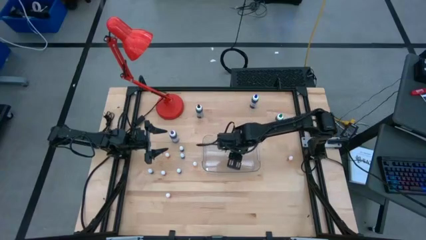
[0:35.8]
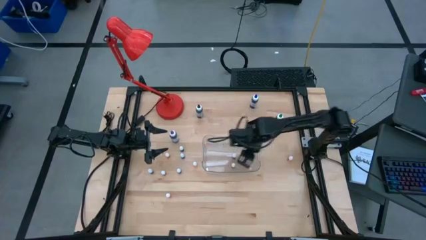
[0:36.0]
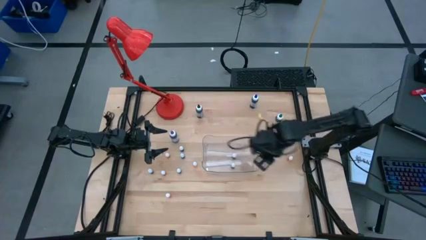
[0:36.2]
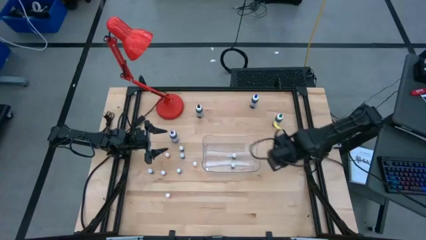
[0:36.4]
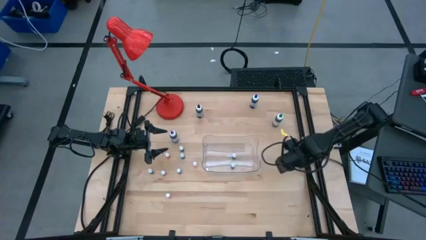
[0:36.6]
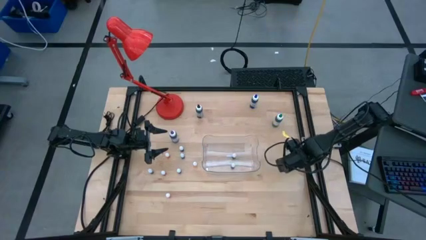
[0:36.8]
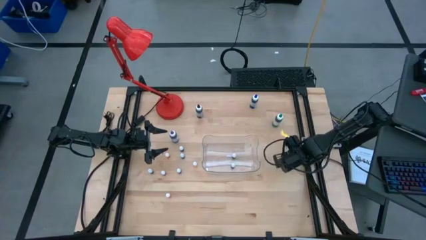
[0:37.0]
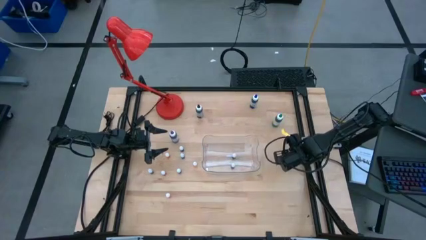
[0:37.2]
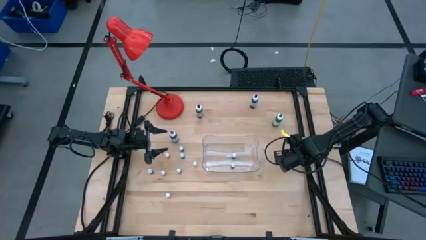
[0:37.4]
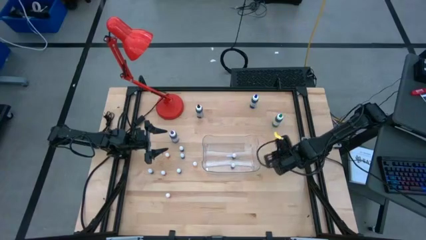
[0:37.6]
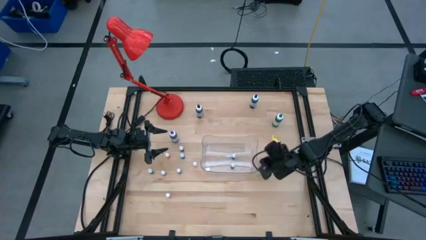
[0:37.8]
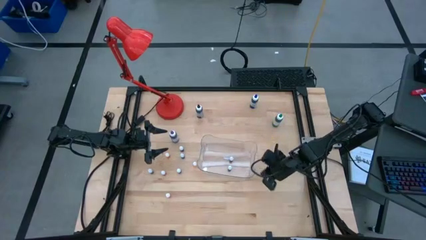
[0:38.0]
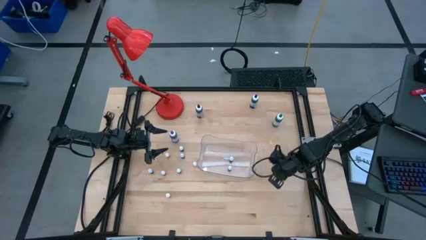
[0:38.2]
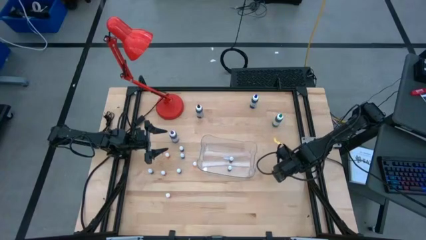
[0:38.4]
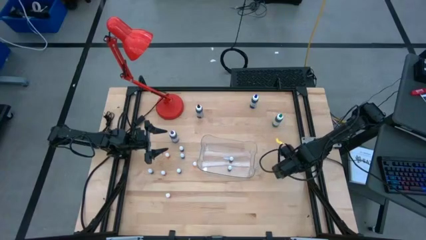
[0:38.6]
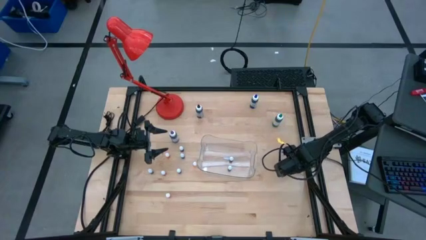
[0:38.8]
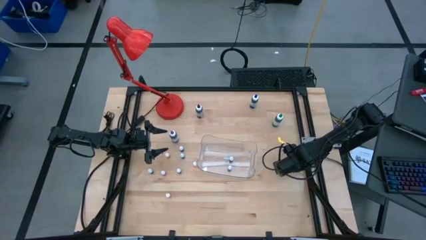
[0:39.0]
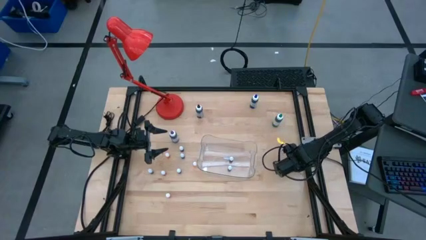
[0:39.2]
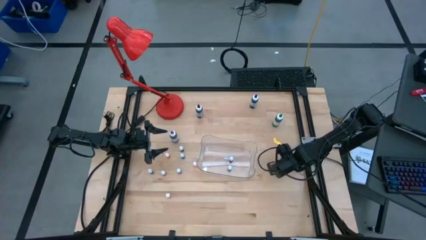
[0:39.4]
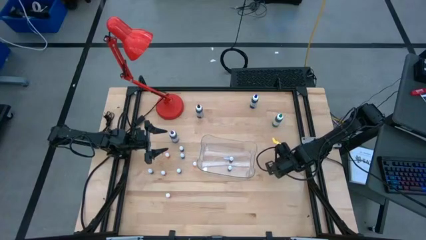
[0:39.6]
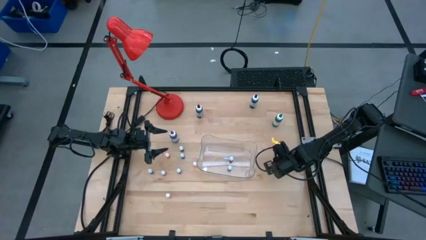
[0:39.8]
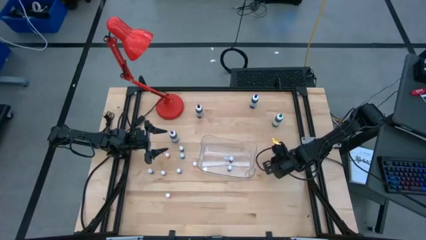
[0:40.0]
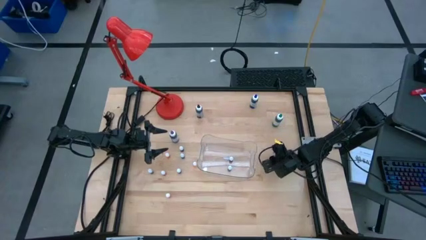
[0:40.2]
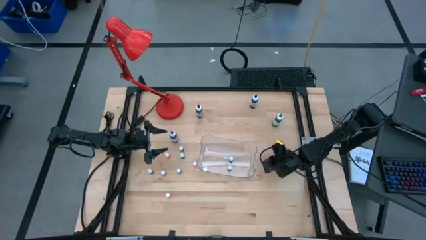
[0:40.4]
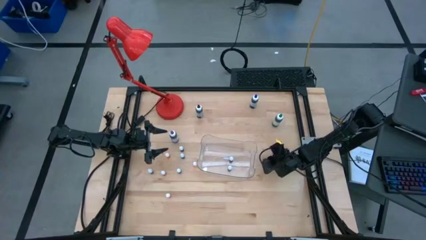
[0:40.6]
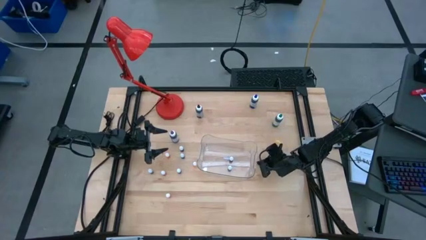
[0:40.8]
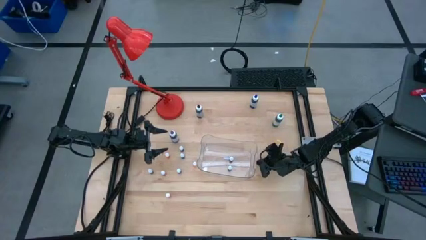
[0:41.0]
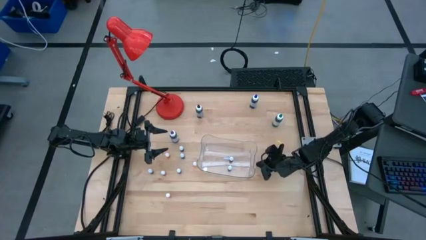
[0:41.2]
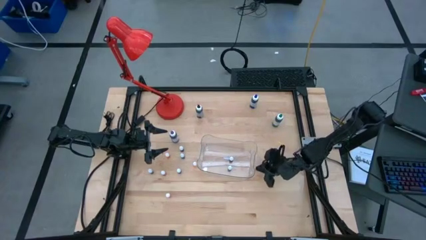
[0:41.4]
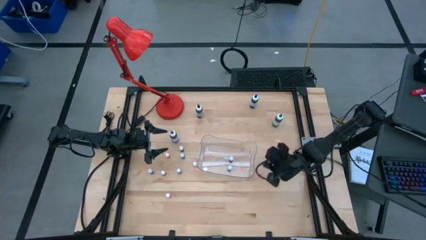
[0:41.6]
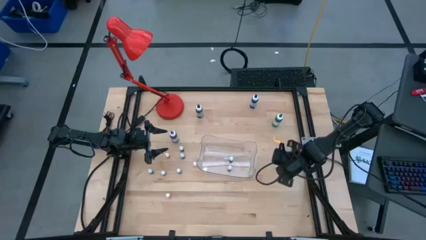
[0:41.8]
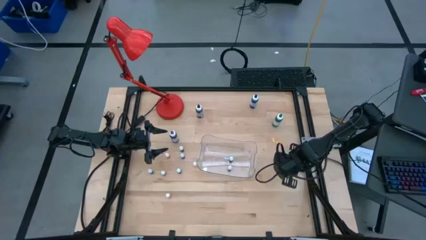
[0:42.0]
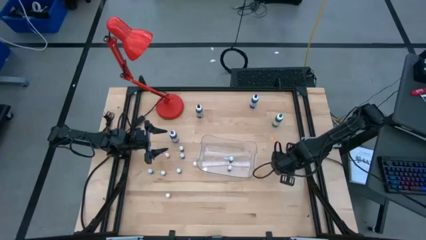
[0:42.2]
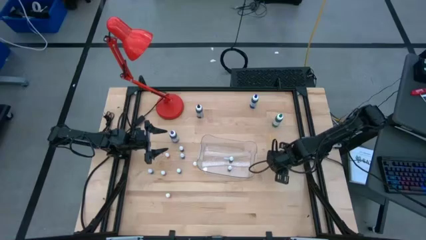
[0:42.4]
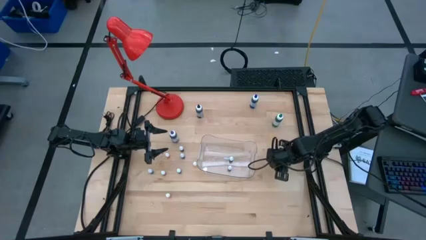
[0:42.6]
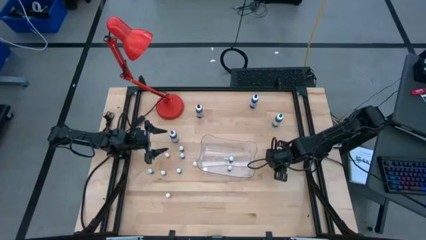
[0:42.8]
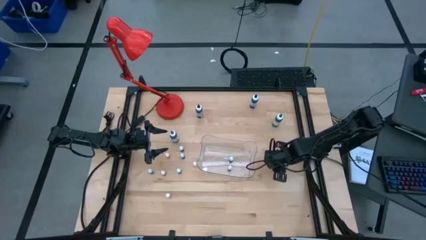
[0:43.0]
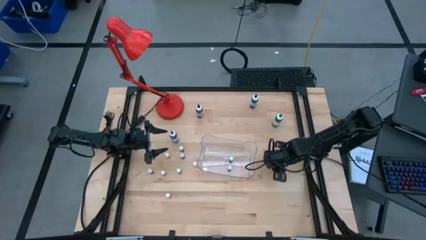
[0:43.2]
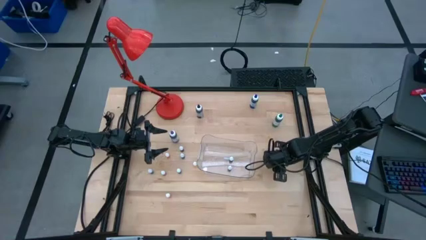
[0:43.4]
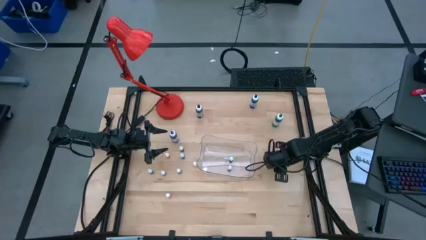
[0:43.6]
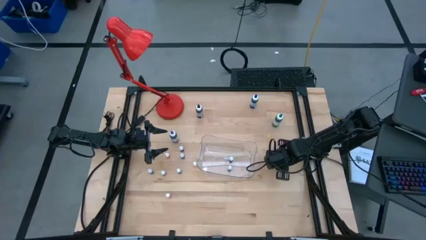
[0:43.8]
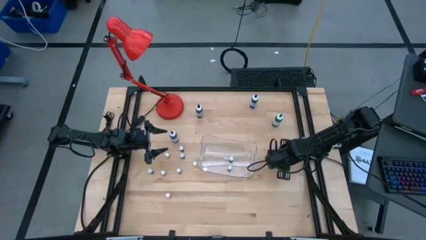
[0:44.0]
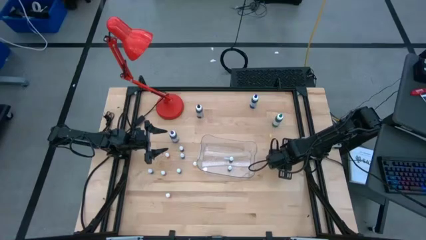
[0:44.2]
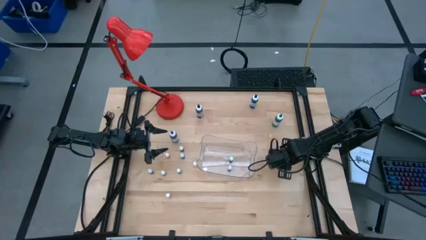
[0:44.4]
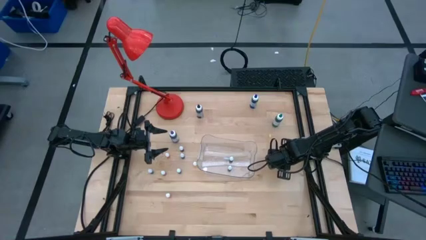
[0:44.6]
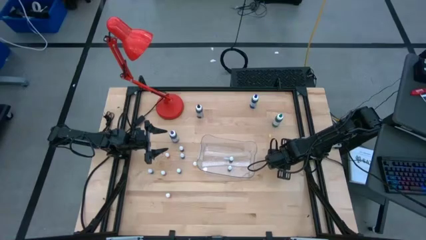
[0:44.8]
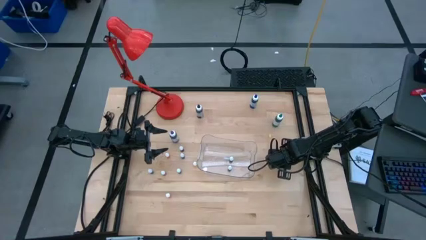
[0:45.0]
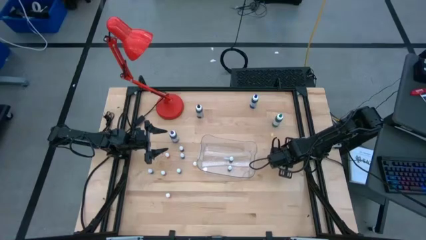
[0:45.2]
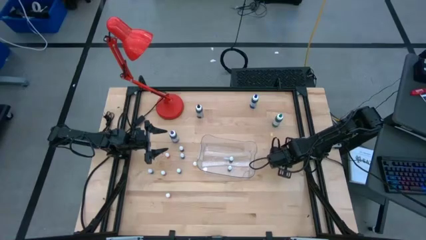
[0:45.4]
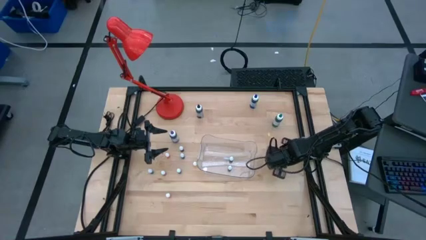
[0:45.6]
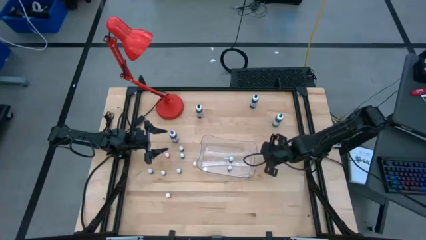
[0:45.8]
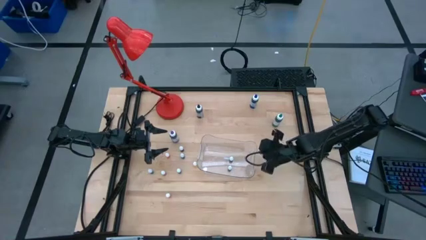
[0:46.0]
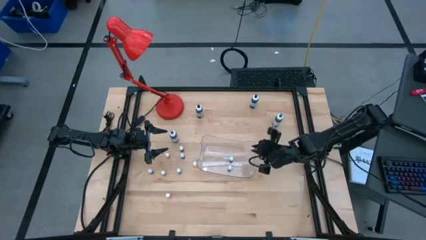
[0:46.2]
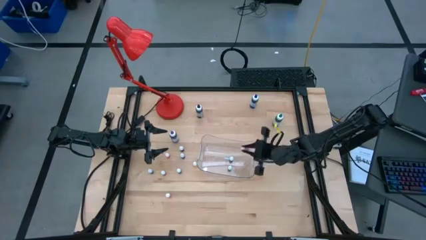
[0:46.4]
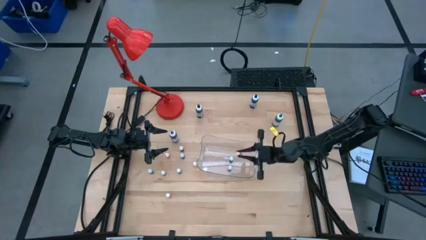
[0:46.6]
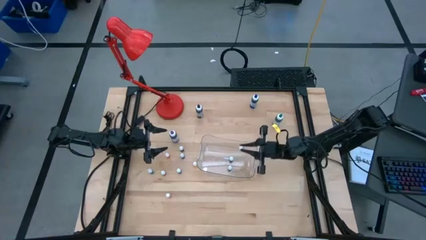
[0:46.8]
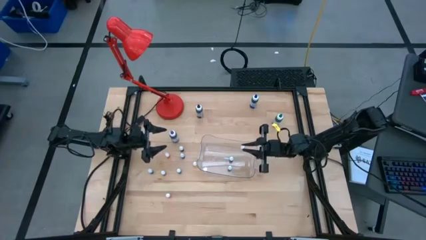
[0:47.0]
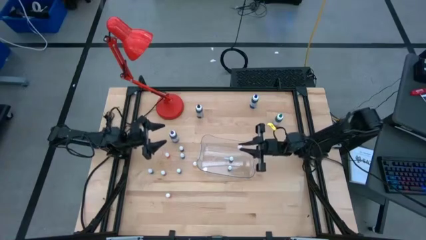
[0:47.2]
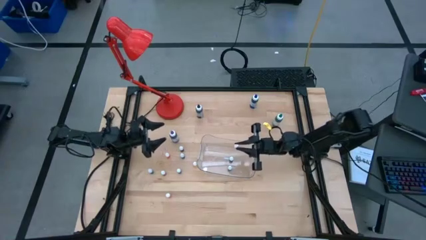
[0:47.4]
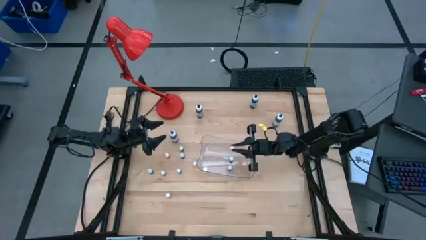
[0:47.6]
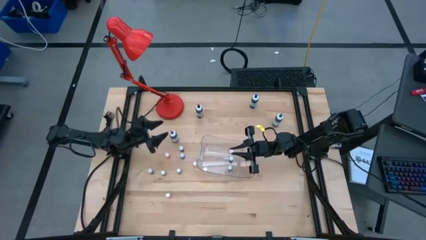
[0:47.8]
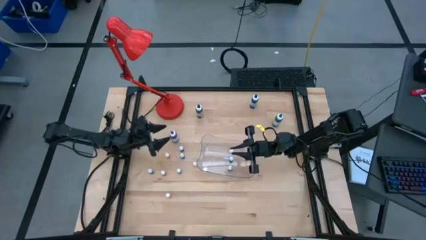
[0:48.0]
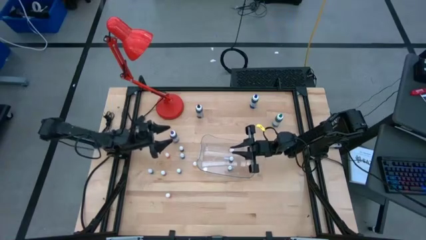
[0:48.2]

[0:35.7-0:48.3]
Task: Pick & Place food coloring
Put the small orange food coloring bottle into the transparent bin
